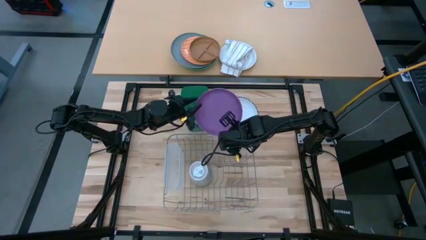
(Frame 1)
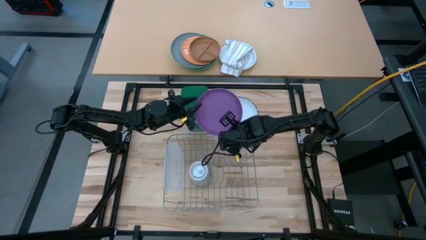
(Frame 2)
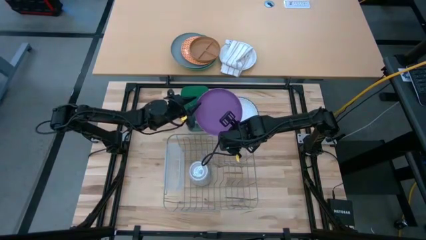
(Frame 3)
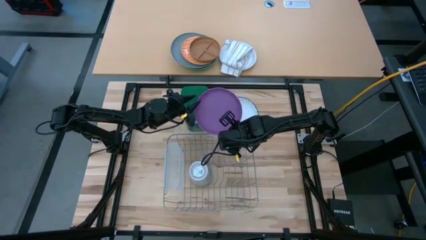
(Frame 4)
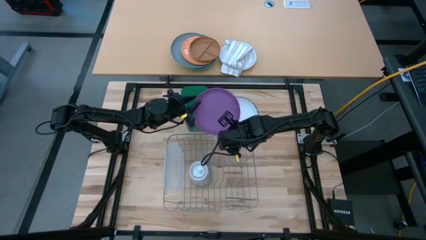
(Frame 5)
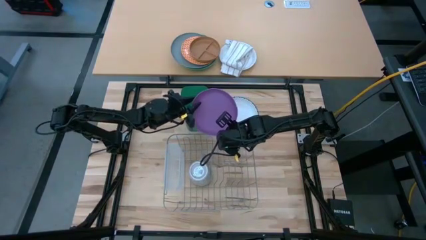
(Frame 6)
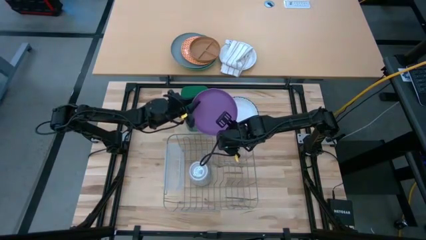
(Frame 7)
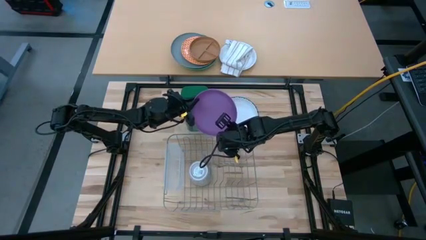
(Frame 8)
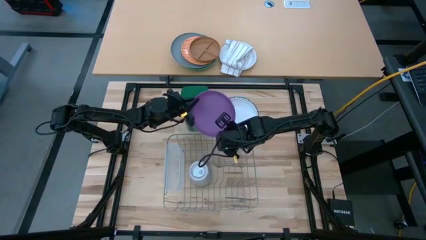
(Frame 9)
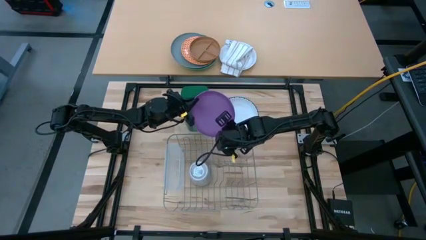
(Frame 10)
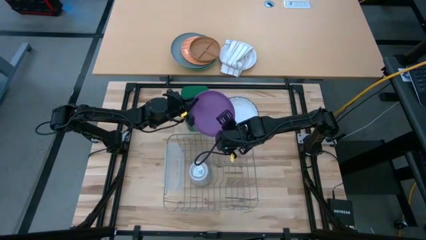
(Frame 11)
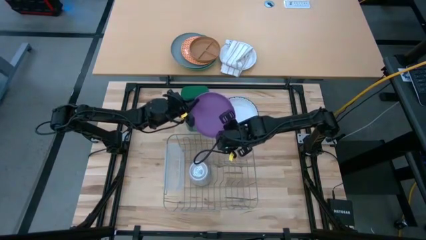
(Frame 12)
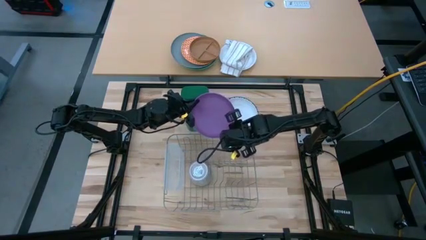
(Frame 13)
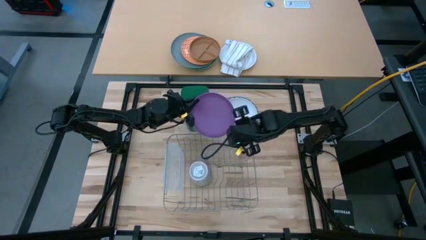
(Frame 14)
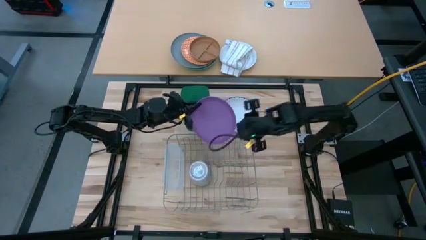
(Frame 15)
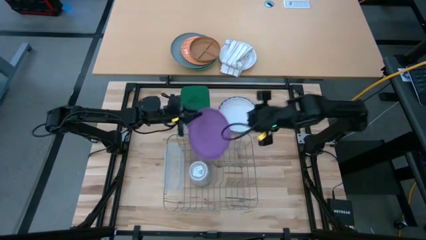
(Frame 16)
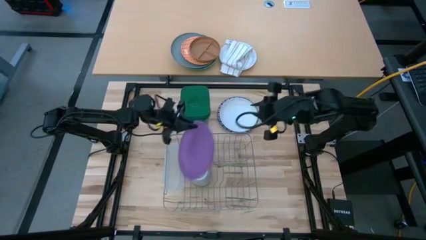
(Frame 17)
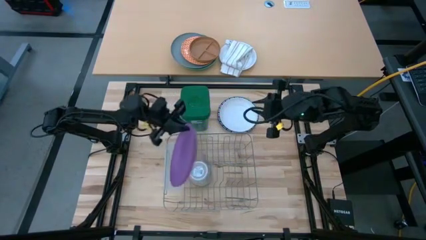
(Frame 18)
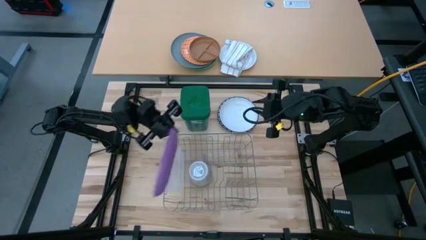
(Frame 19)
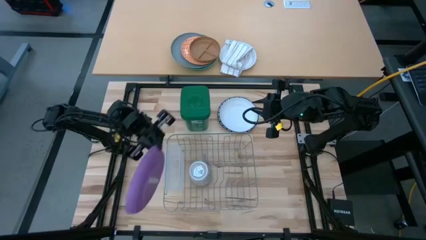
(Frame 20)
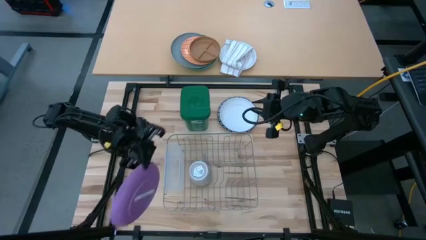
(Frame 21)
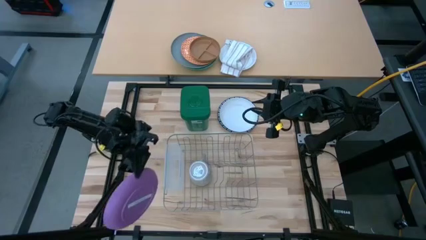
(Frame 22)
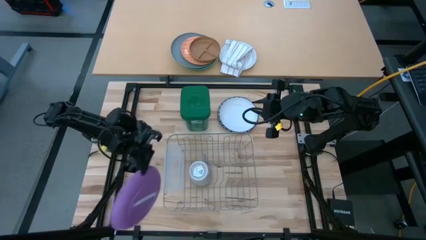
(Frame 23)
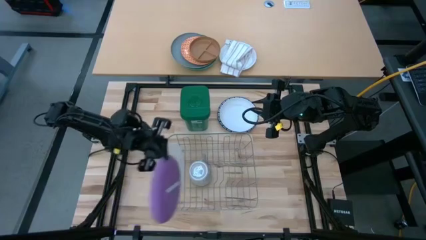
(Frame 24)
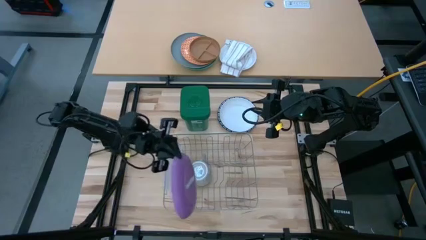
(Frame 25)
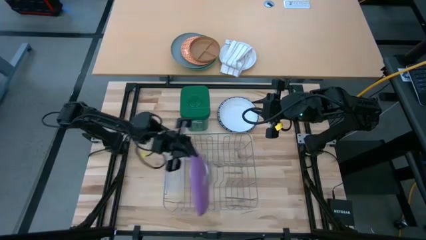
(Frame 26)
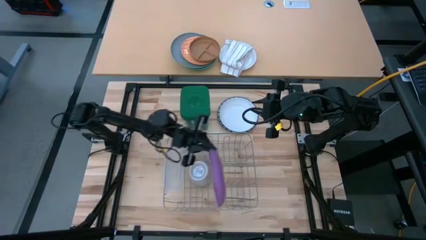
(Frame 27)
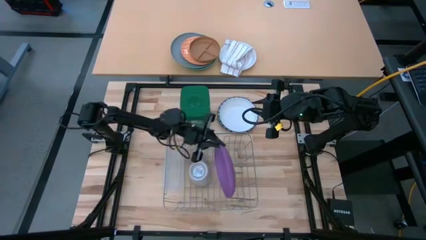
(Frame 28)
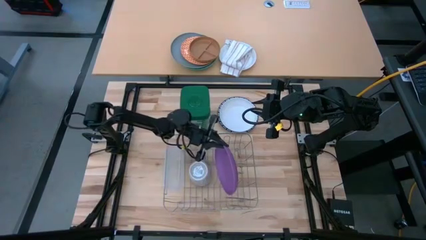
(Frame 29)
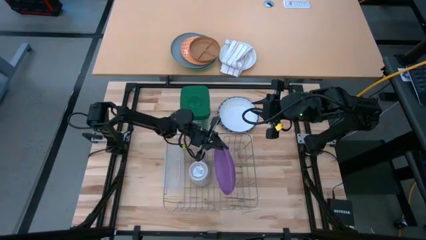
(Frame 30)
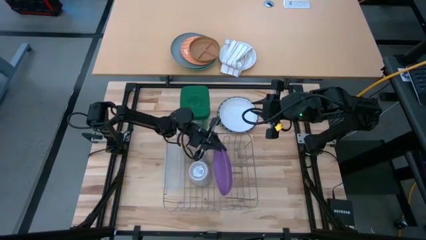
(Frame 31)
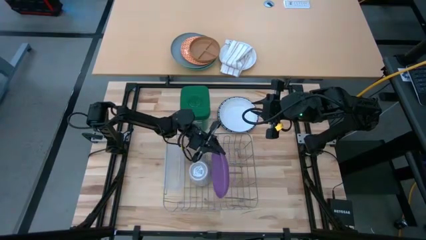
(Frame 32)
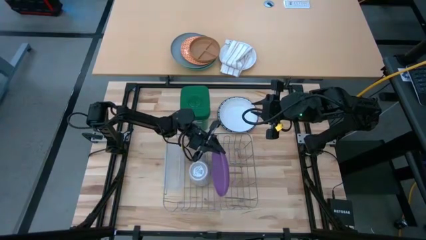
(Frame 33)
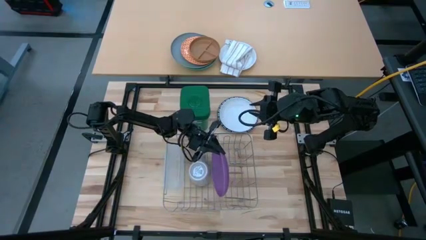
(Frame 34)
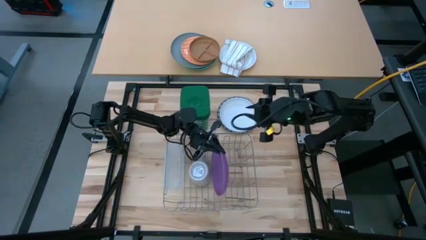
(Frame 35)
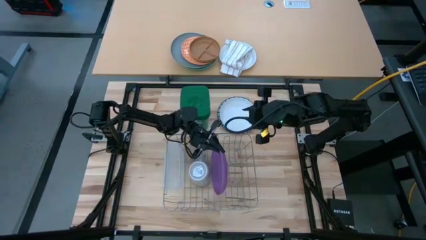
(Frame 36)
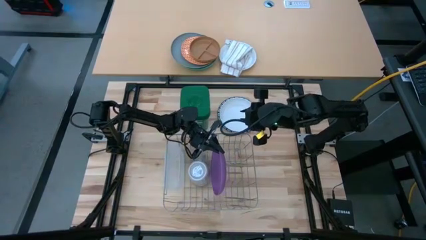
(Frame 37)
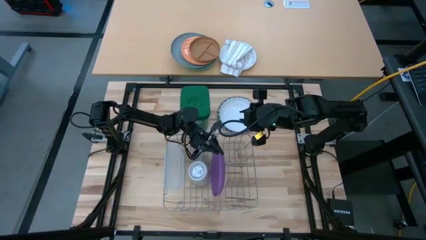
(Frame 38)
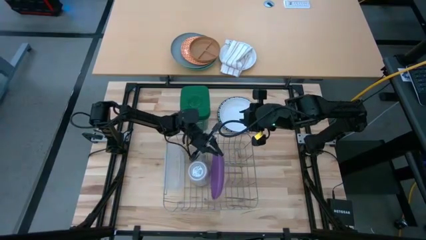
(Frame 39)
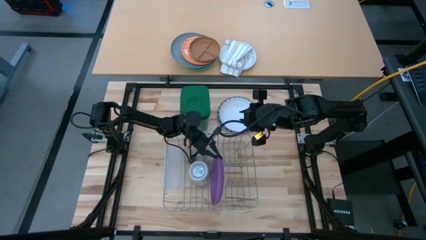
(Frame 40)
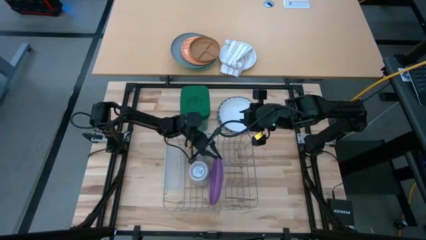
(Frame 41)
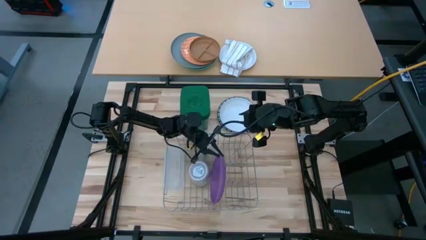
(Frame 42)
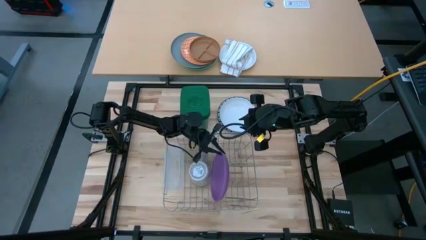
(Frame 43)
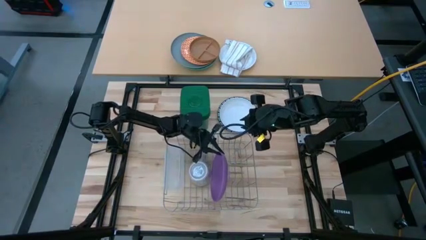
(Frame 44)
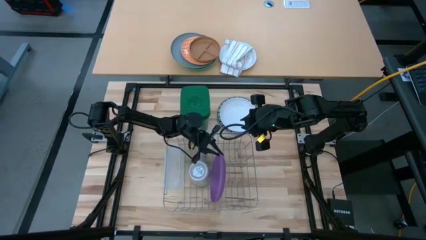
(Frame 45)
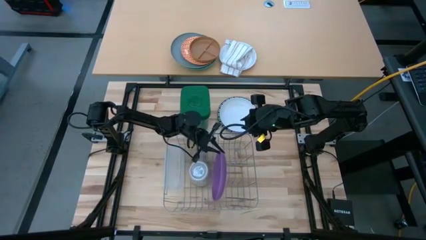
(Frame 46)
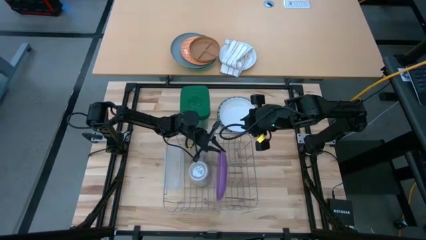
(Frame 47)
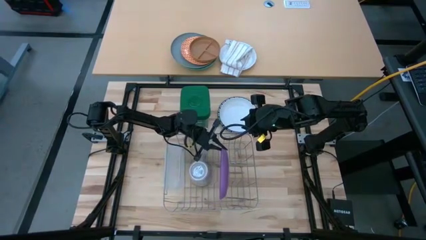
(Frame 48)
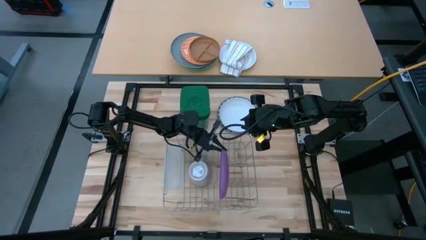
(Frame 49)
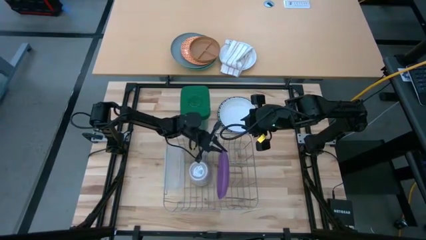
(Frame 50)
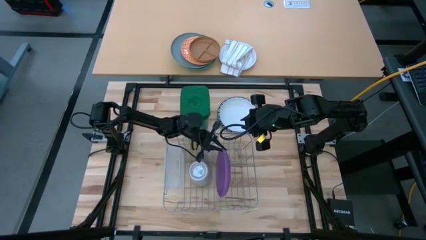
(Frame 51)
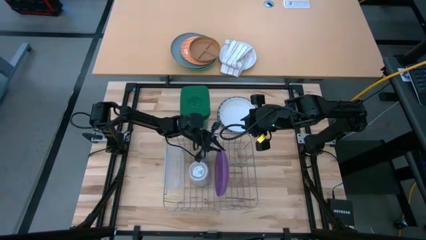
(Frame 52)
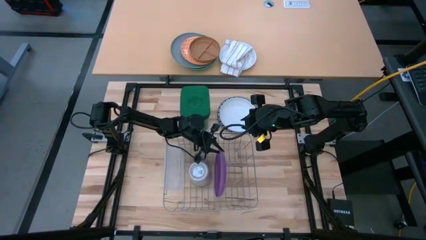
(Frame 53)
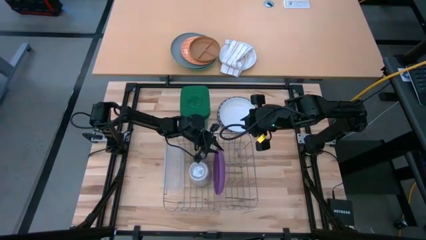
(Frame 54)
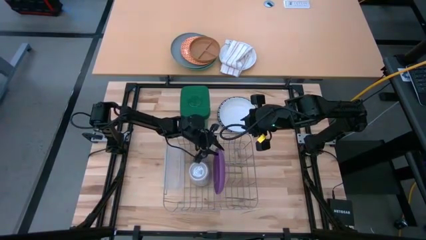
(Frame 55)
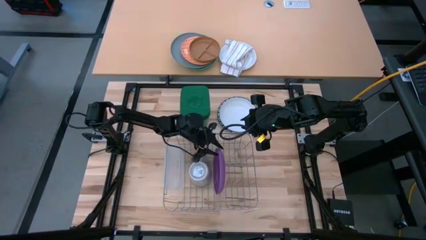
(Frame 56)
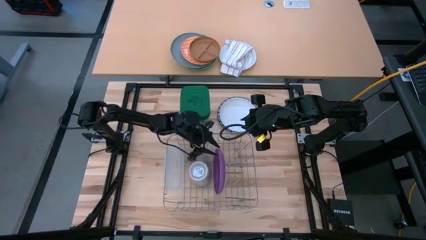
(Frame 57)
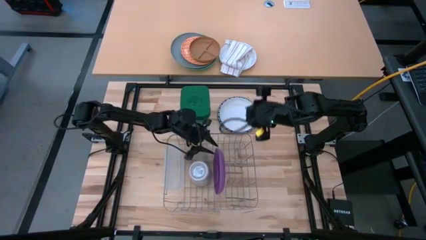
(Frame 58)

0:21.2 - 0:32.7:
Task: Sort dishes
Put the purple plate into the dish rack

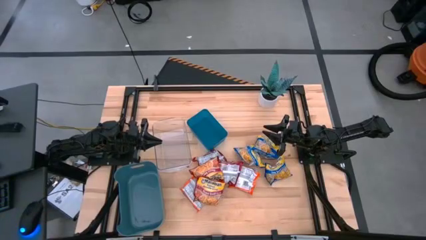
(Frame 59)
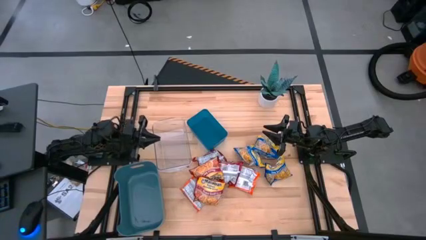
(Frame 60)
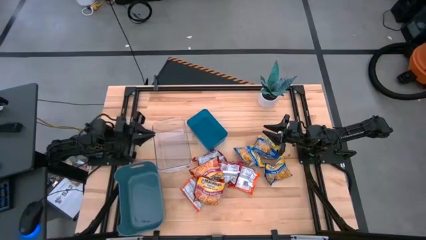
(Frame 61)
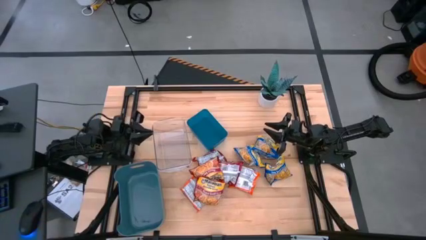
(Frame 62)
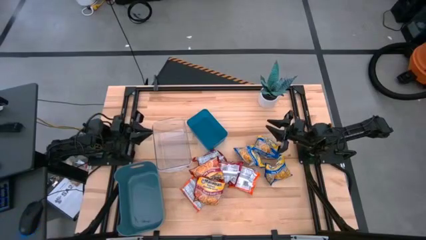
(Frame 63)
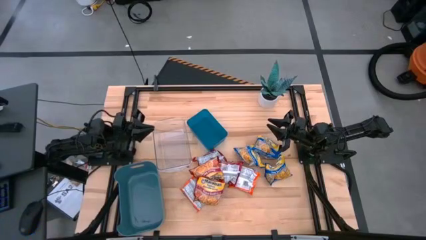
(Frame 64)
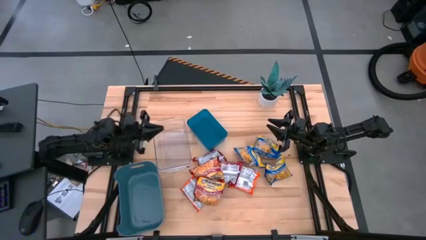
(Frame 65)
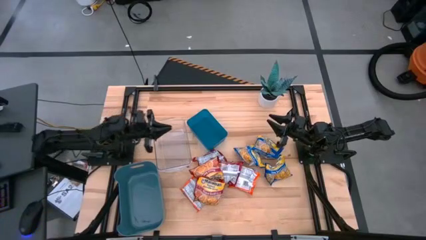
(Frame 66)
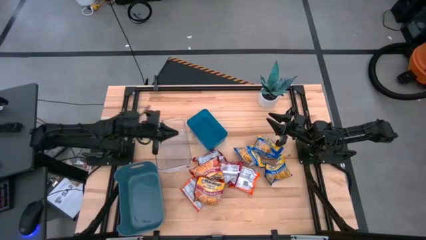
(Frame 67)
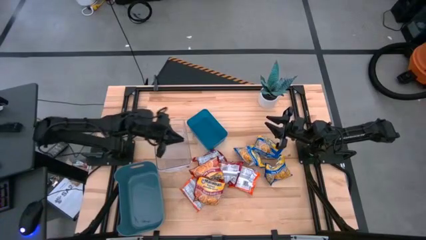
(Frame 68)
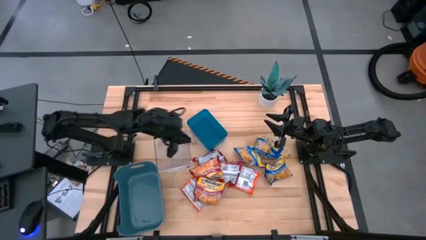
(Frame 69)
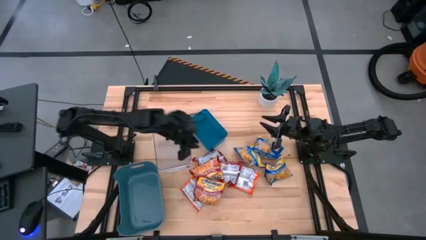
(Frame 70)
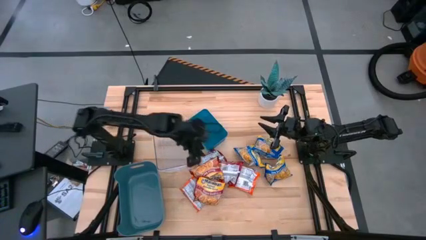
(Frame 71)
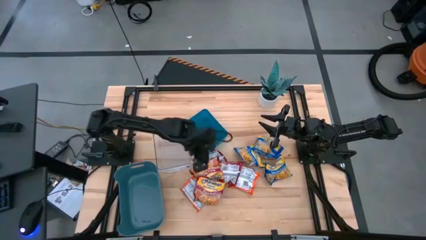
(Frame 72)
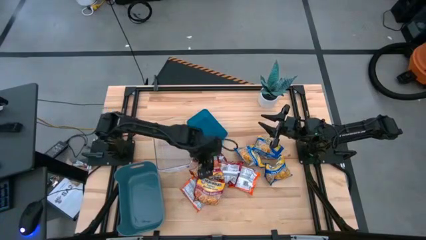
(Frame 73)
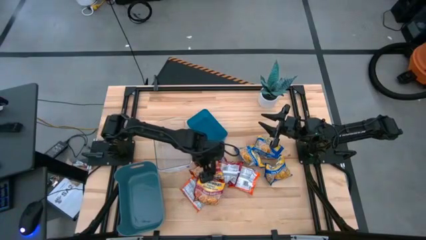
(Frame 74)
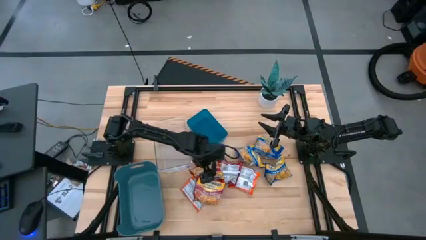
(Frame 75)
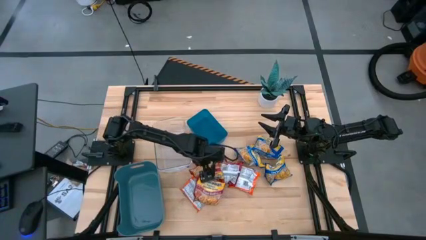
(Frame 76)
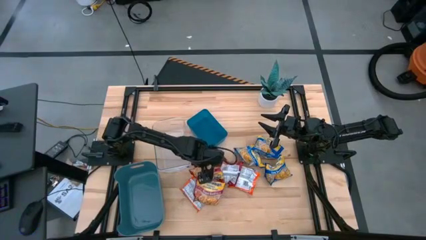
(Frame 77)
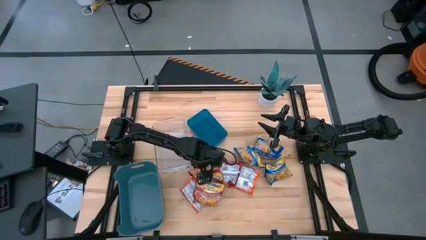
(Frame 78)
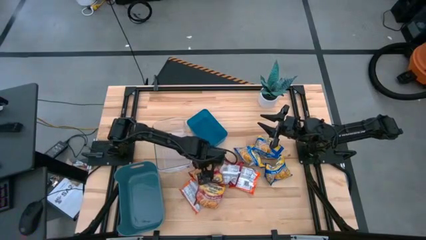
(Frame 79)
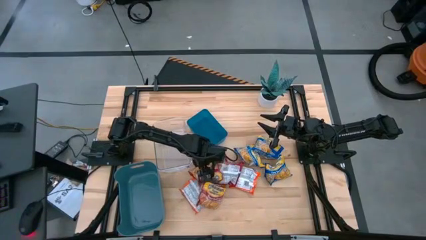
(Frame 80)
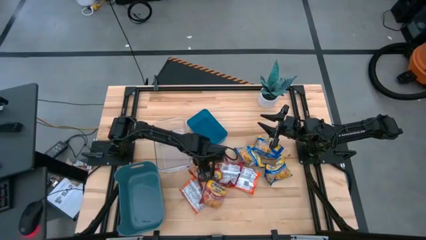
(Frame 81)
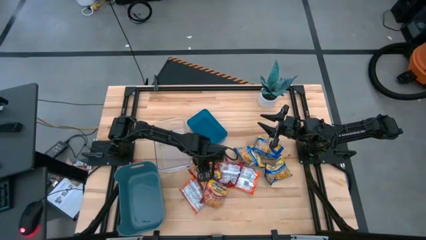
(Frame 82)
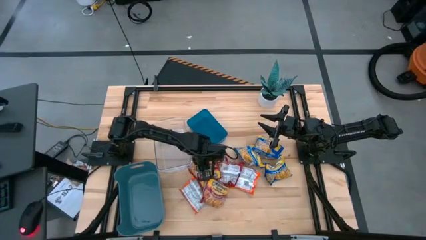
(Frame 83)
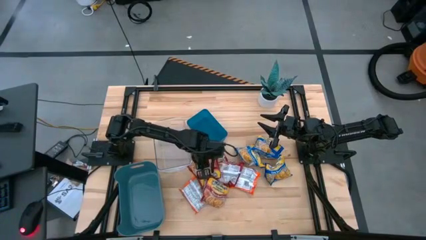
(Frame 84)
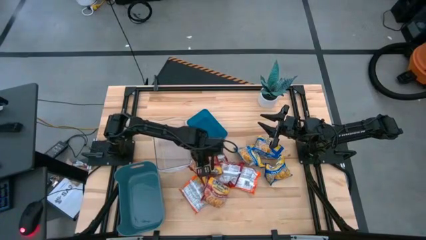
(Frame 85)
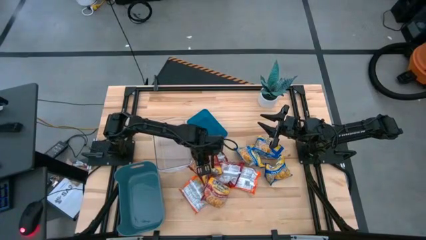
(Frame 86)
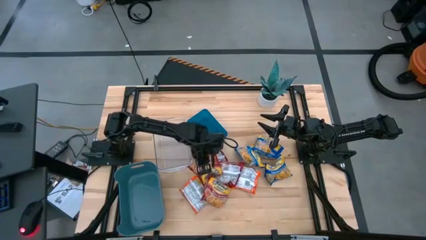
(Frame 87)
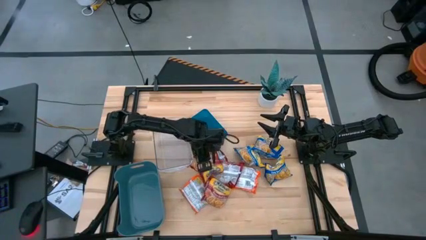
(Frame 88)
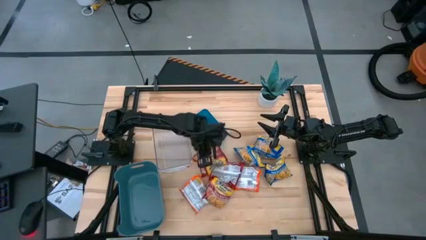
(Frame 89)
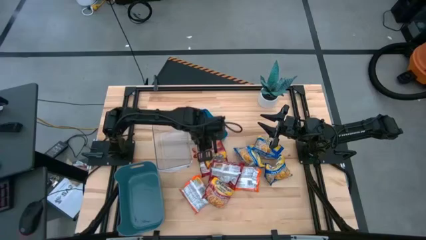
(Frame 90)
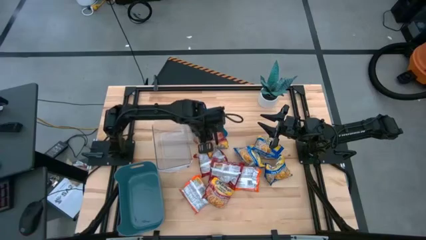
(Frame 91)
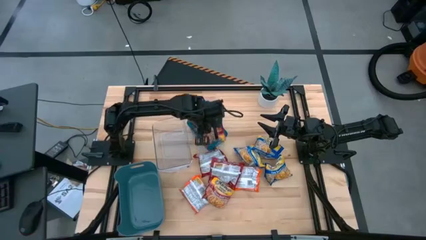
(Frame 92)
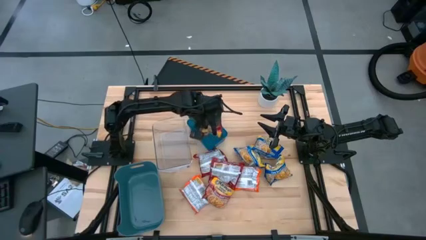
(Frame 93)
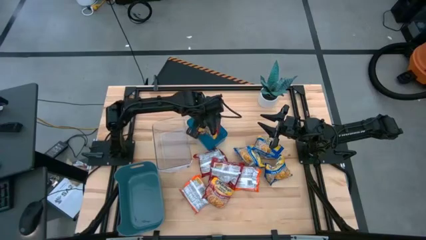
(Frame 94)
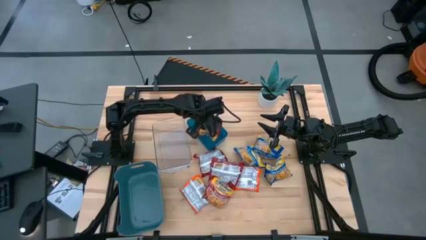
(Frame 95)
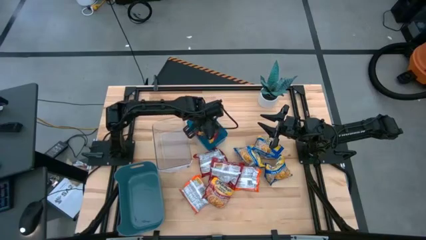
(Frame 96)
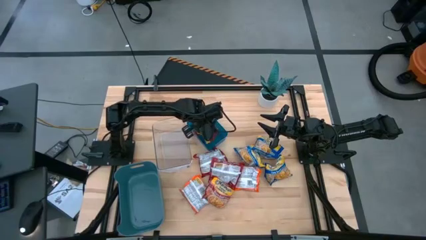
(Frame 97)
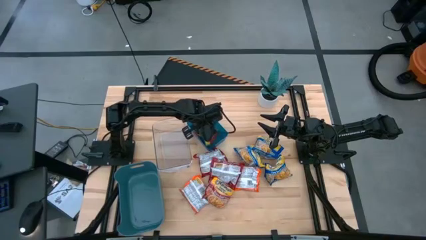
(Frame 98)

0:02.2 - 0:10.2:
Task: Sort Maruchan noodles
Put the red noodle pack into the blue bin
